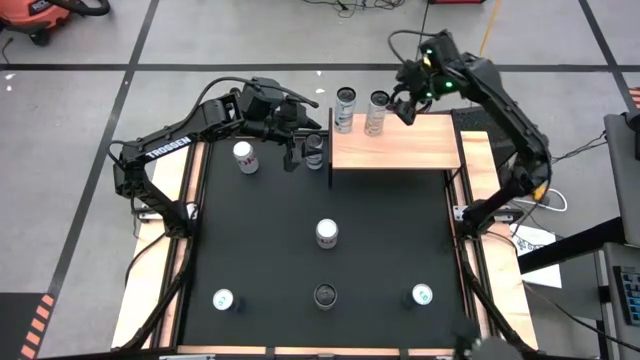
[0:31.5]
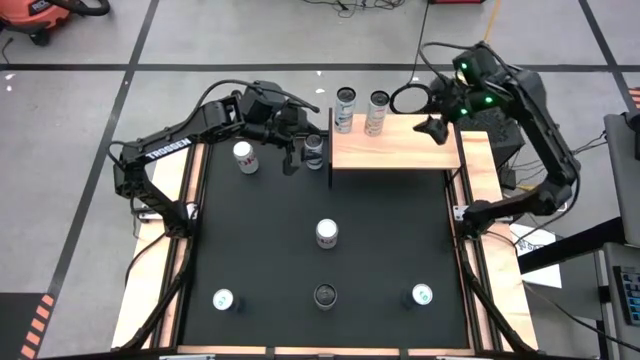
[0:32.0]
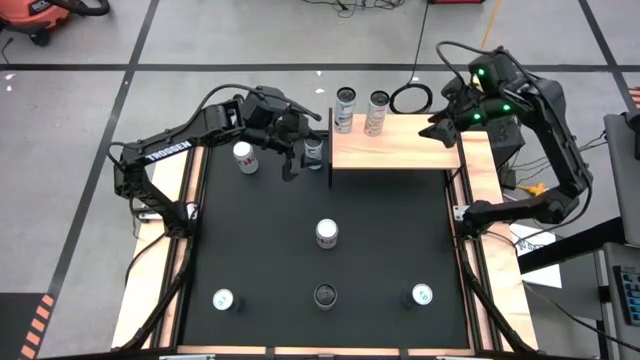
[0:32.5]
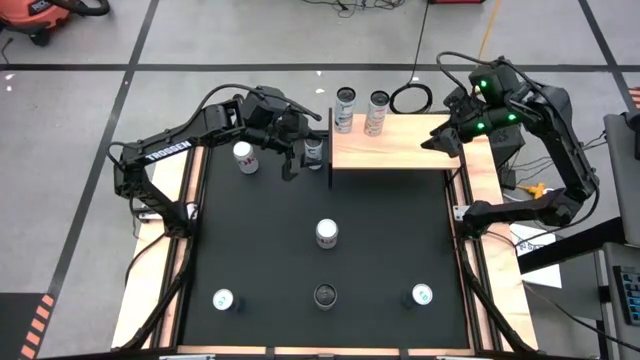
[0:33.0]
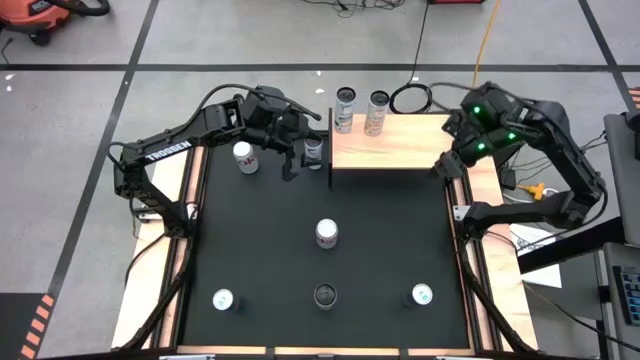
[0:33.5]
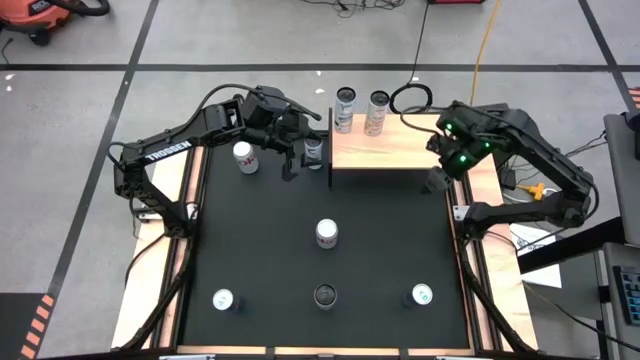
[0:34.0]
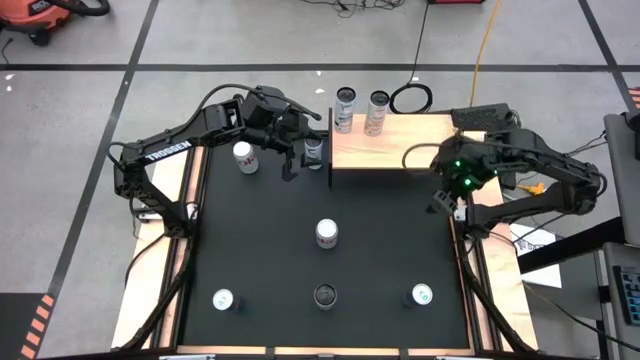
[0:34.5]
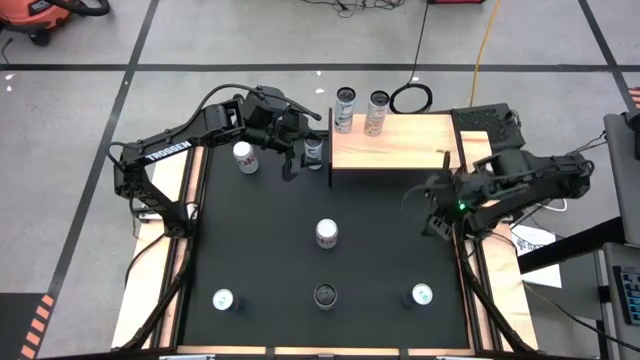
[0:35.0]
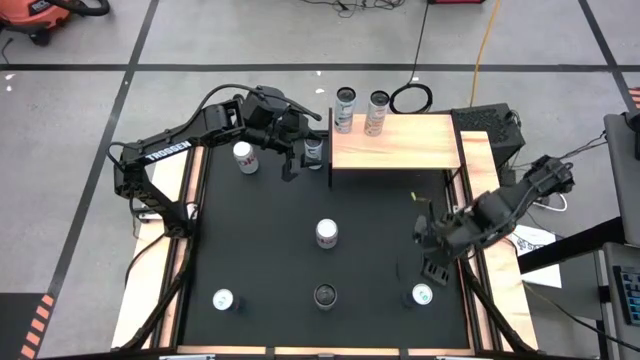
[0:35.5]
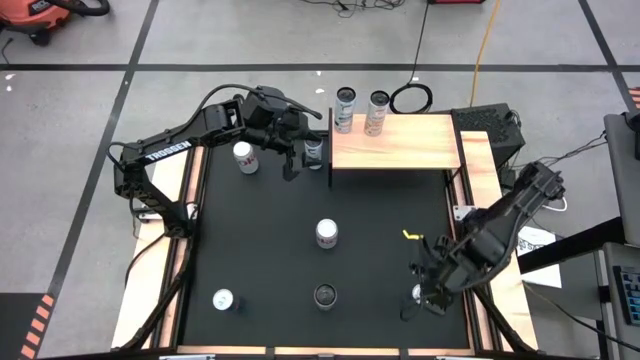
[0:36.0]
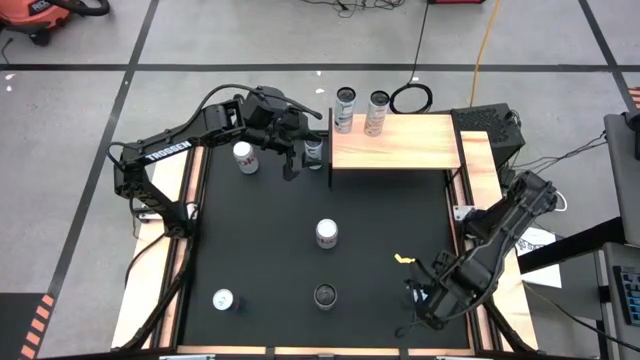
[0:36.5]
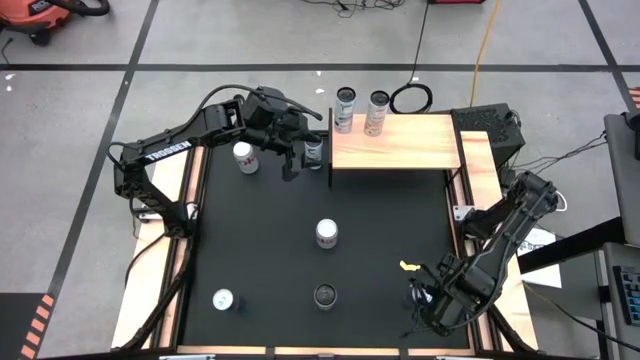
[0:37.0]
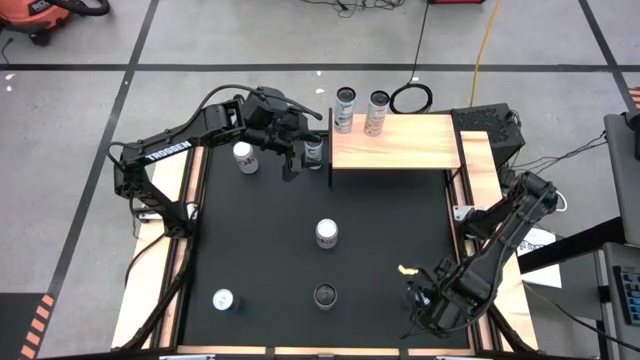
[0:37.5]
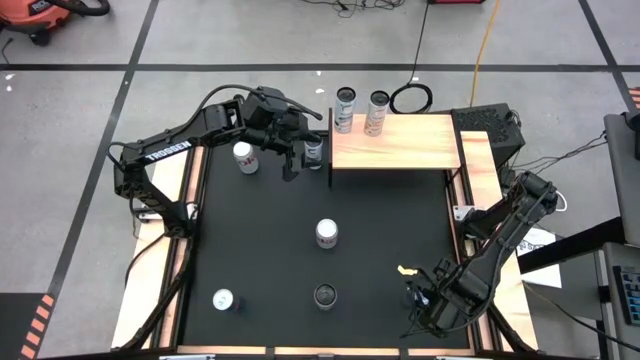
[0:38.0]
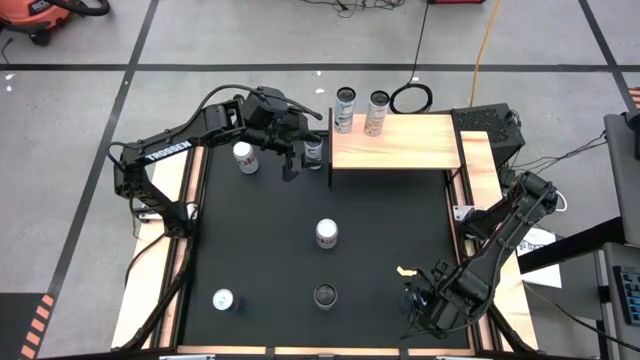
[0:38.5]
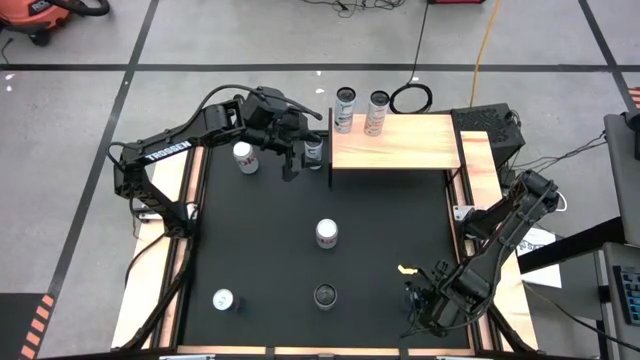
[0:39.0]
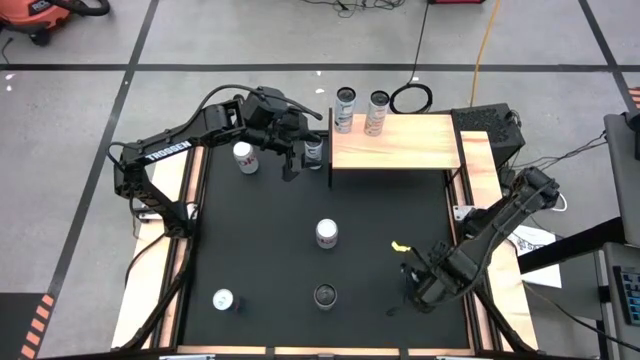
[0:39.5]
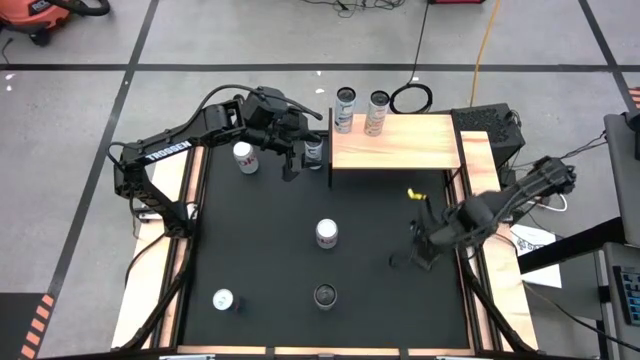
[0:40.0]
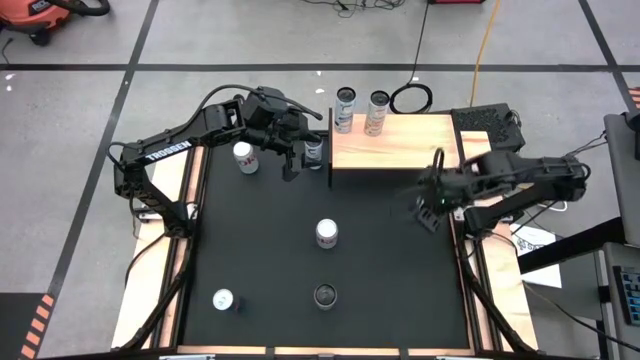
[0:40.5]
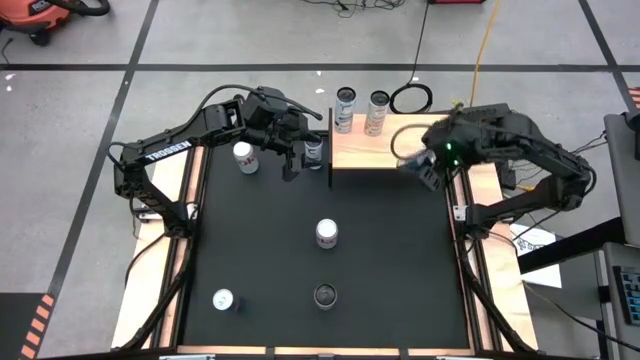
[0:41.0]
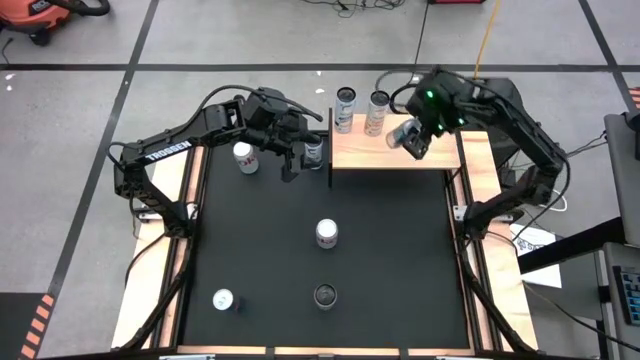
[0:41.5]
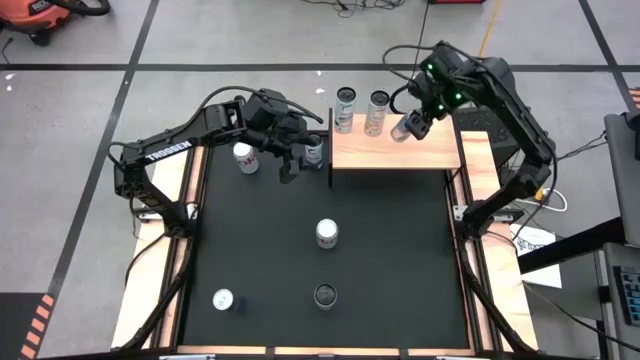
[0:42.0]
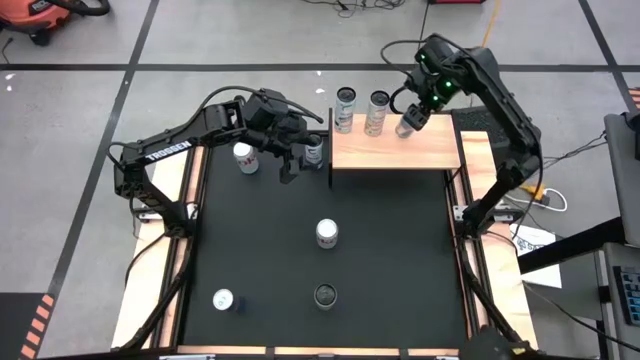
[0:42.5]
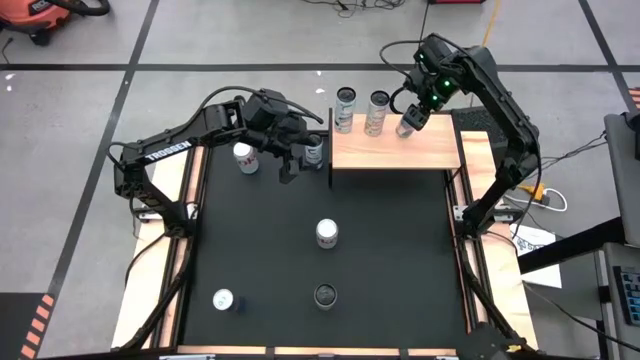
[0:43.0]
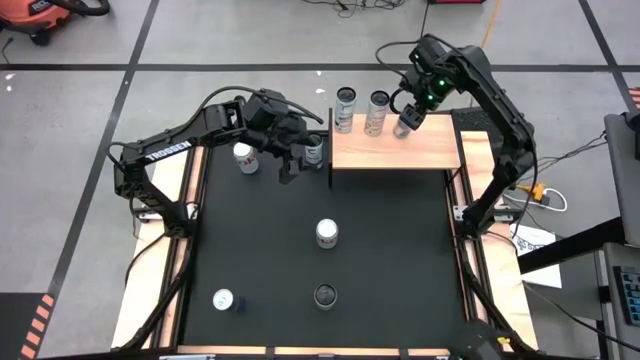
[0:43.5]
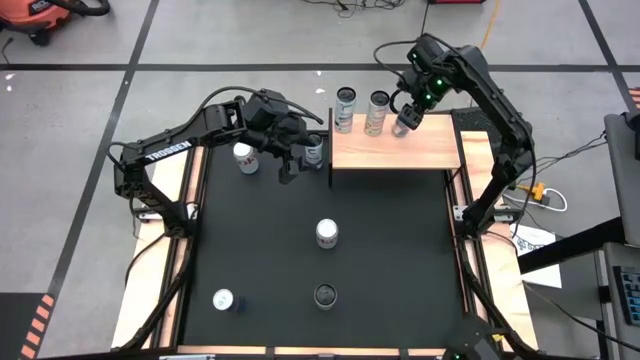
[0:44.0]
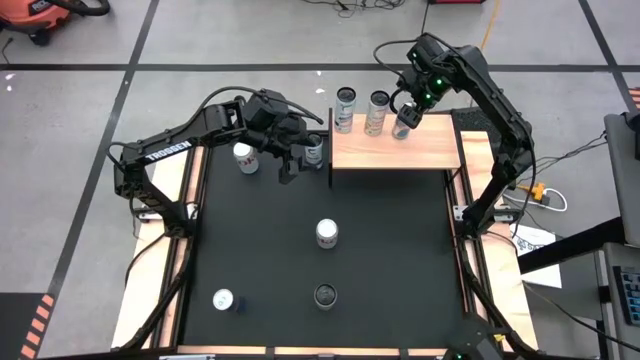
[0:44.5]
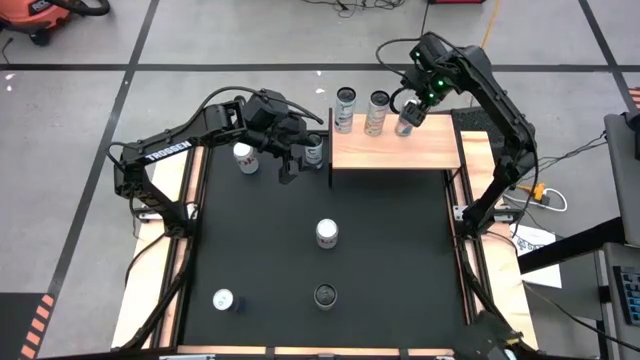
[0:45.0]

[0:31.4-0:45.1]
Task: Place canned beverage on shelf
Put the right blue soda can on the shelf

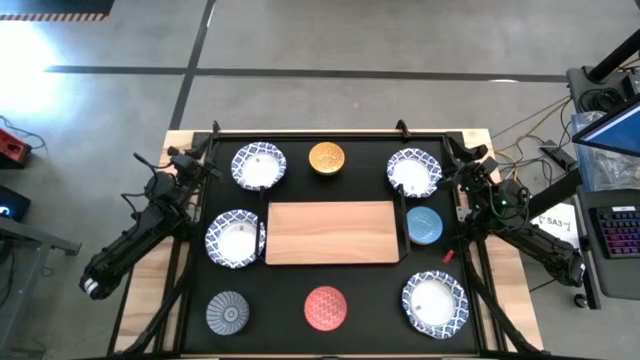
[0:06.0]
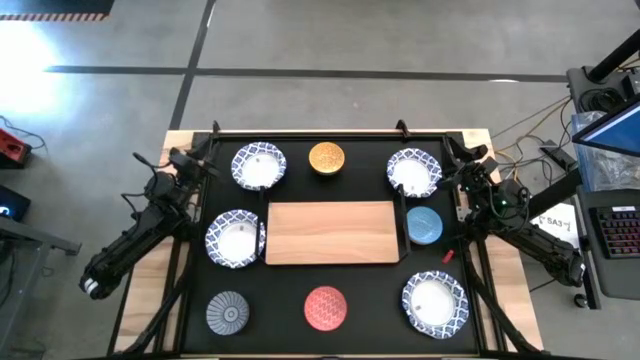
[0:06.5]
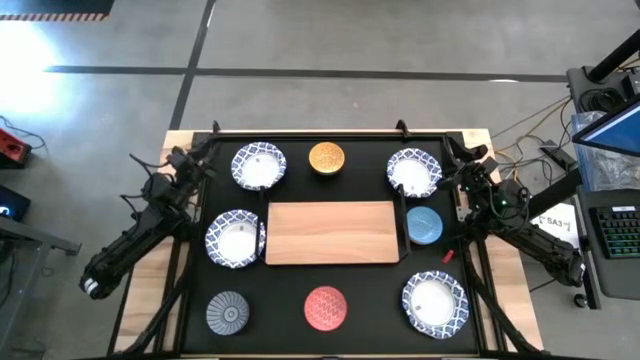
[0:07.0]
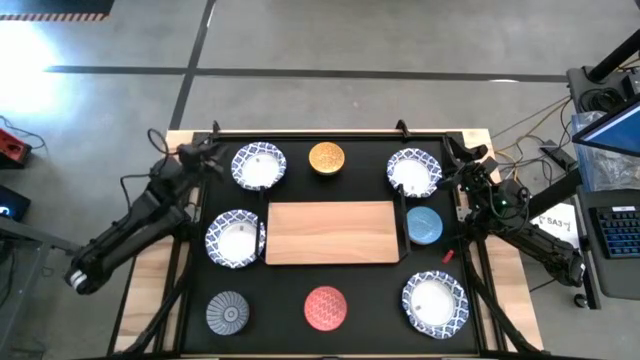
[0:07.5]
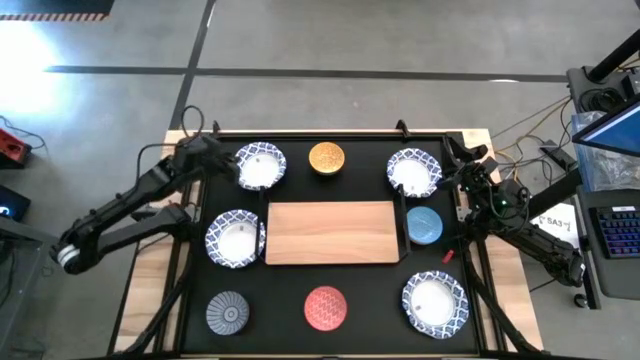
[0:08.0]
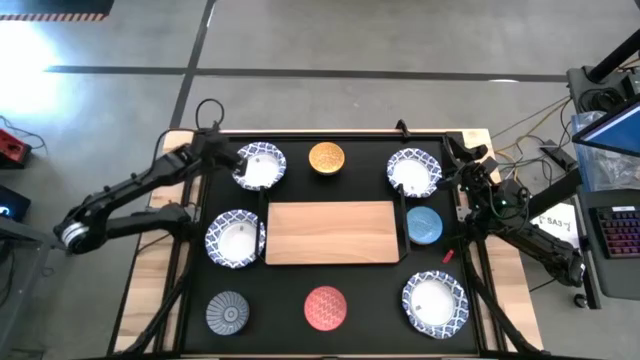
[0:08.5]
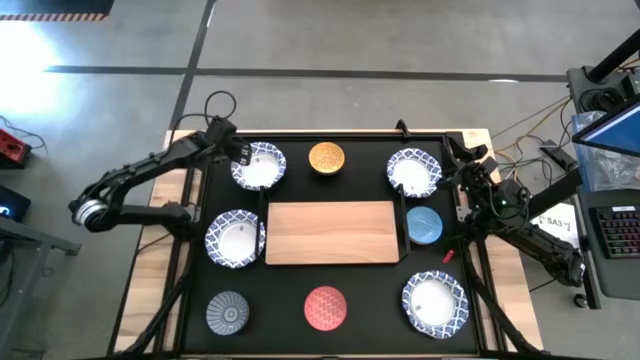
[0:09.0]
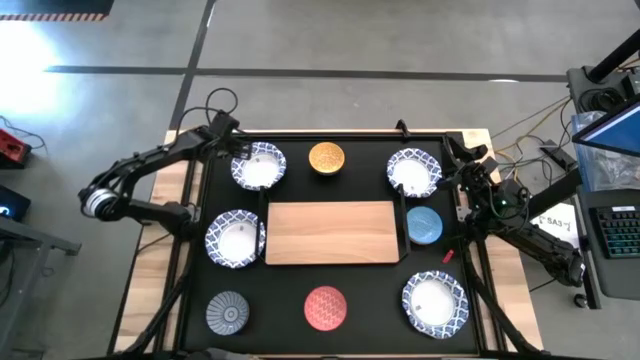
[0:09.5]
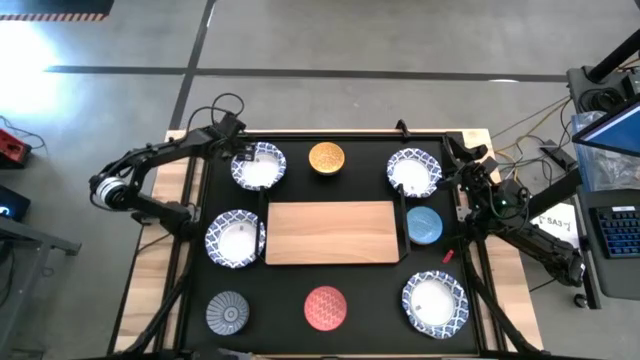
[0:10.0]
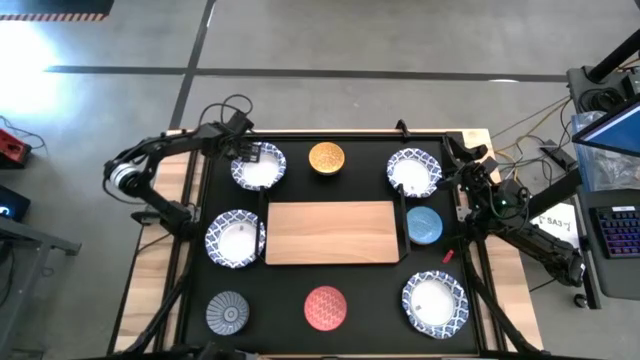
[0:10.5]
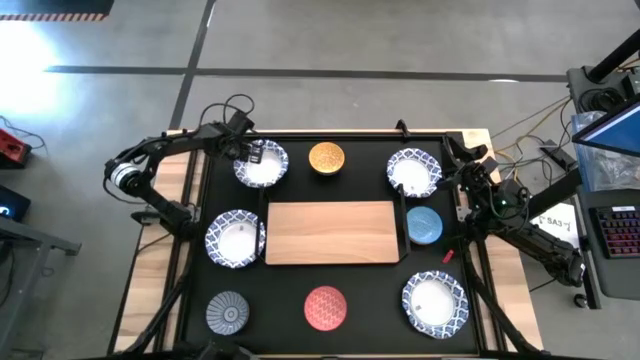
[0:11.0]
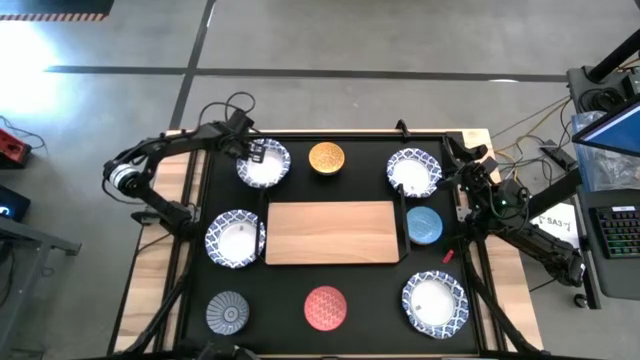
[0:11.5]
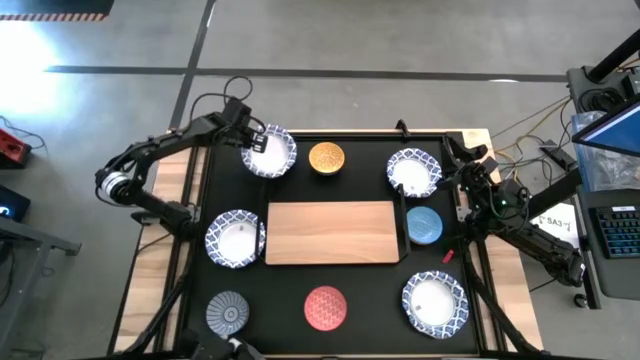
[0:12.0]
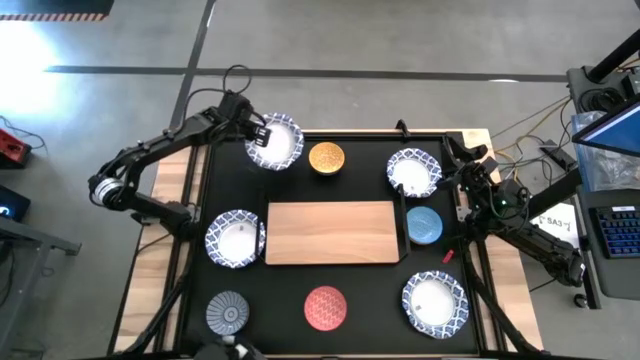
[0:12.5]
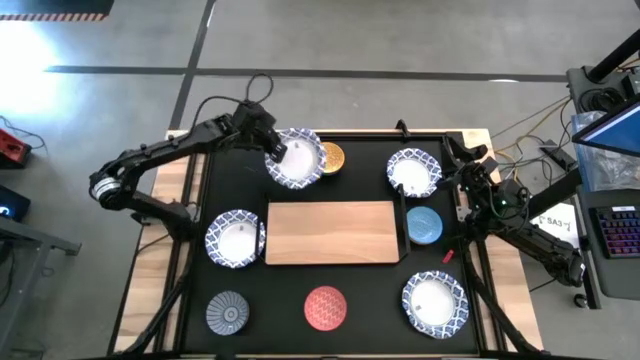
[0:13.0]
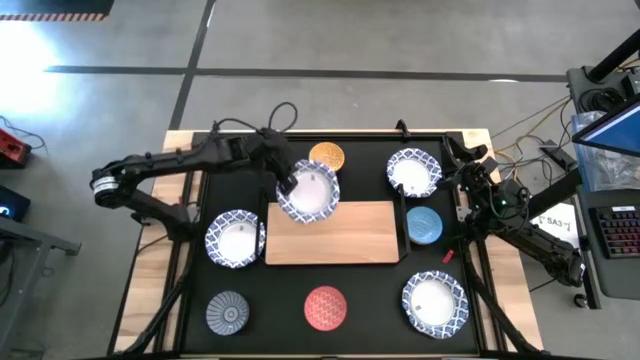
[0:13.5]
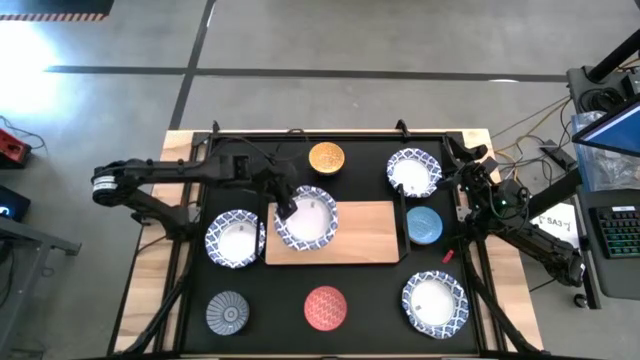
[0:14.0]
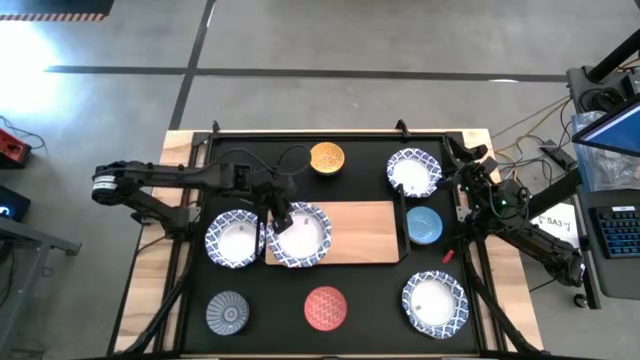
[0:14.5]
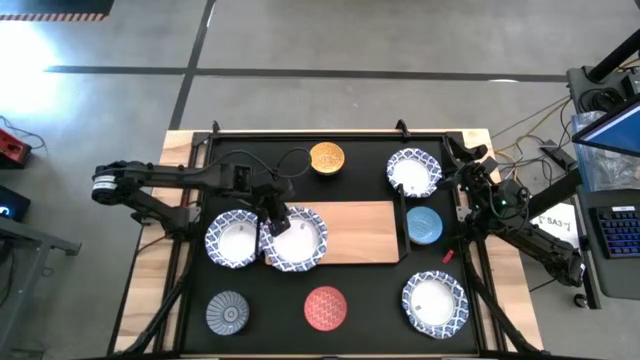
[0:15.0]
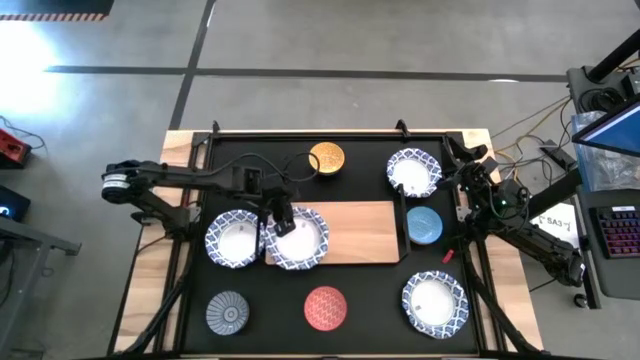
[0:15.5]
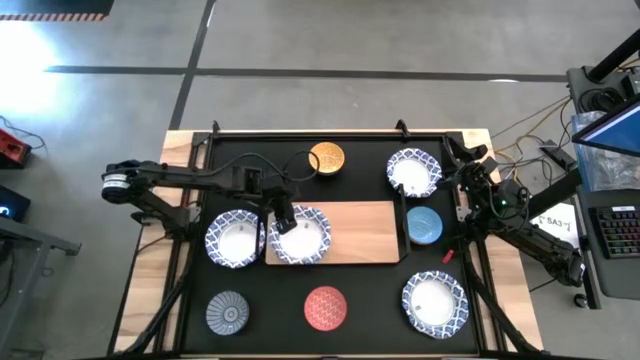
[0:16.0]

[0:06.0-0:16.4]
Task: Place and stack bowls onto a shelf
Put the top left white patterned bowl on the shelf
